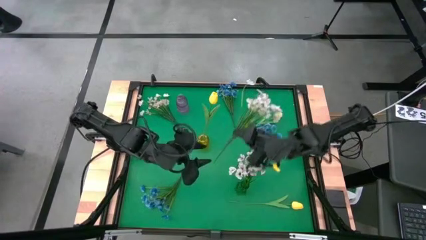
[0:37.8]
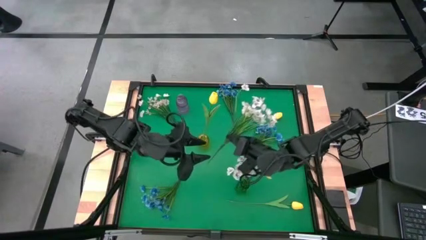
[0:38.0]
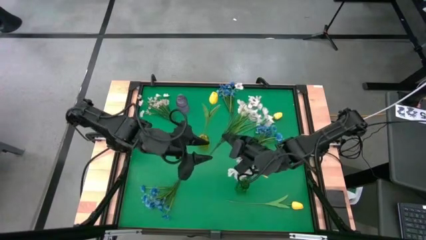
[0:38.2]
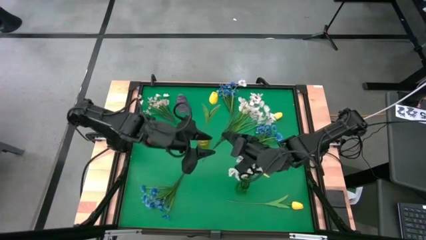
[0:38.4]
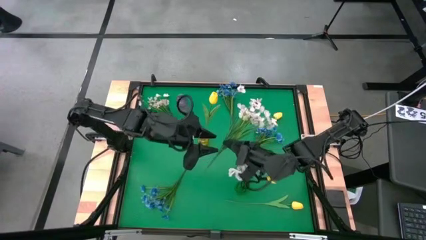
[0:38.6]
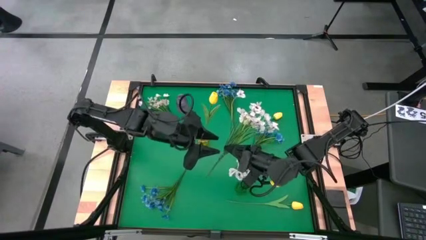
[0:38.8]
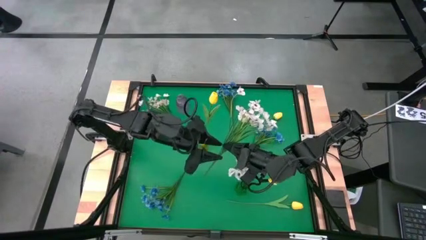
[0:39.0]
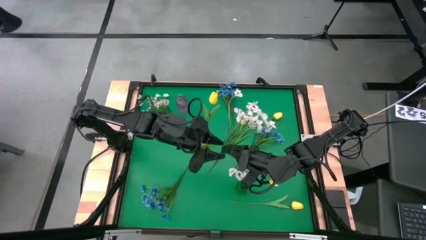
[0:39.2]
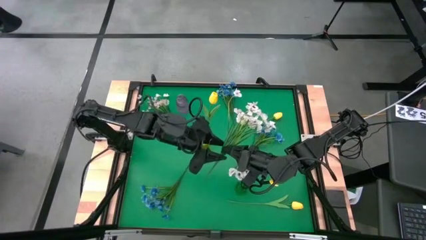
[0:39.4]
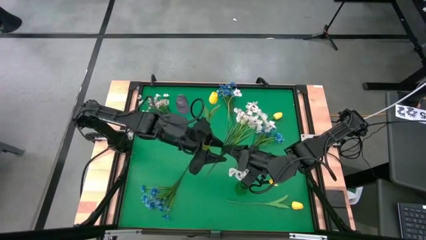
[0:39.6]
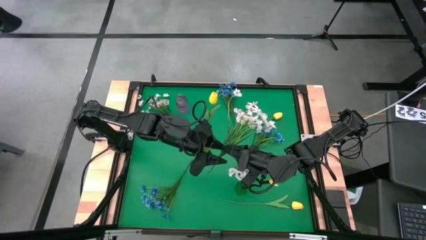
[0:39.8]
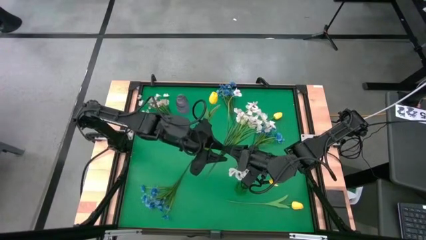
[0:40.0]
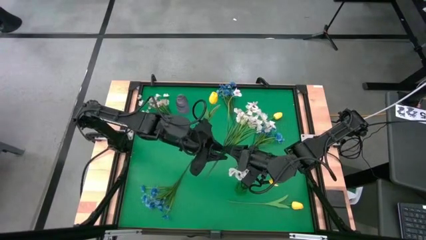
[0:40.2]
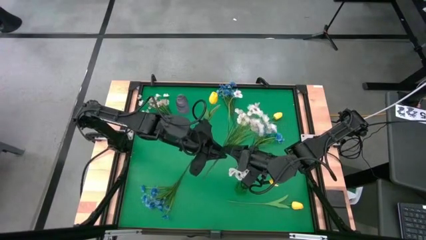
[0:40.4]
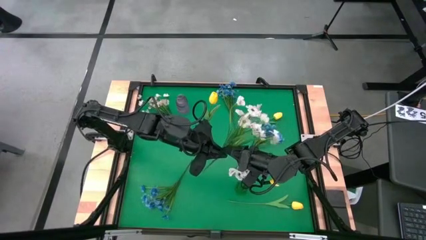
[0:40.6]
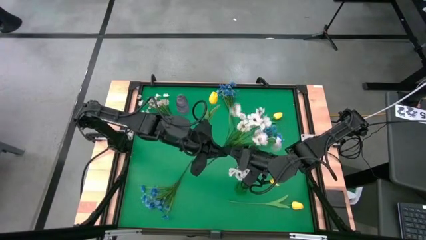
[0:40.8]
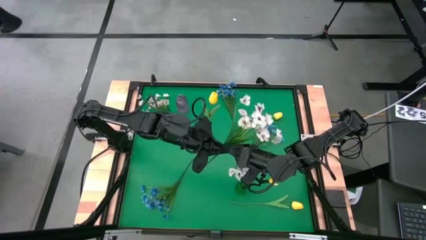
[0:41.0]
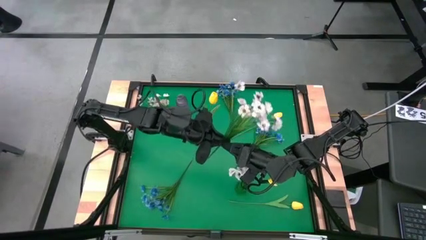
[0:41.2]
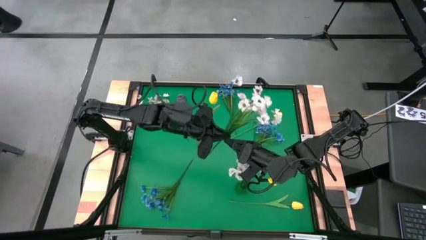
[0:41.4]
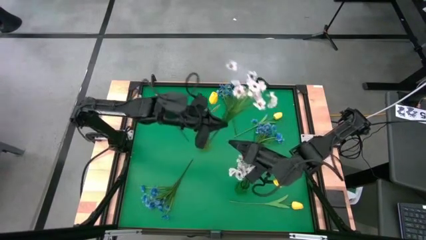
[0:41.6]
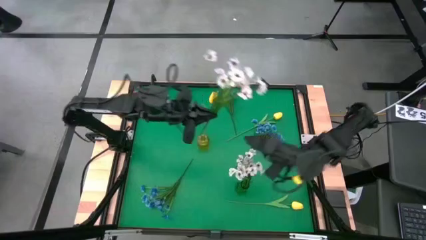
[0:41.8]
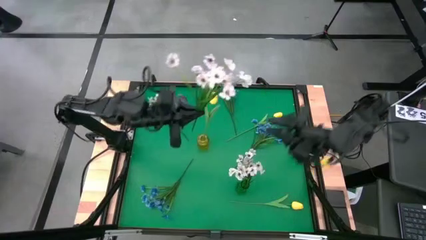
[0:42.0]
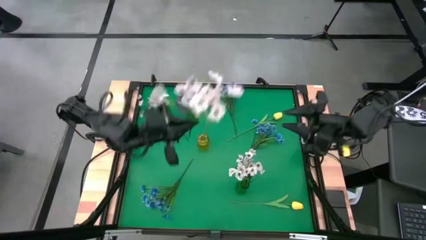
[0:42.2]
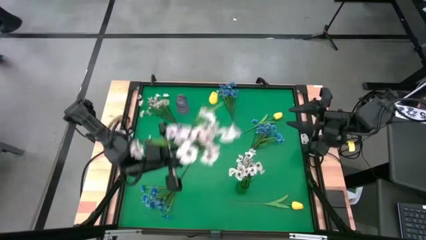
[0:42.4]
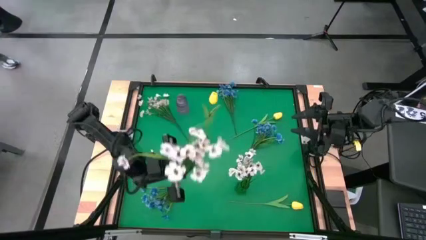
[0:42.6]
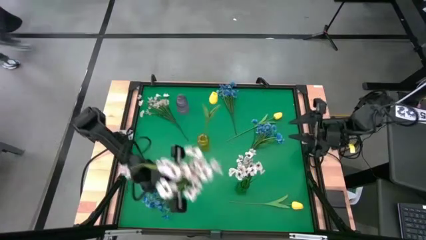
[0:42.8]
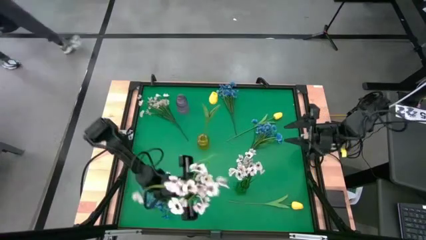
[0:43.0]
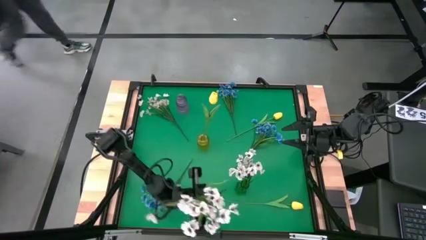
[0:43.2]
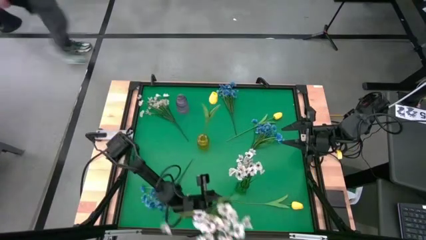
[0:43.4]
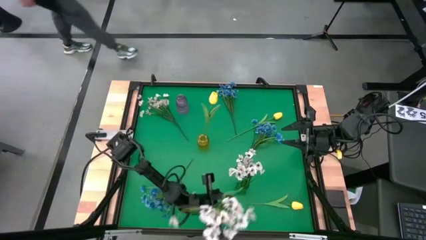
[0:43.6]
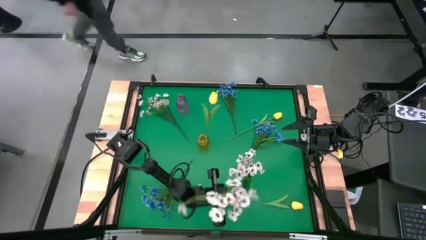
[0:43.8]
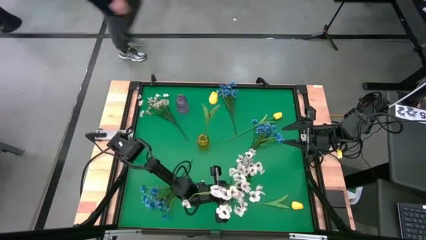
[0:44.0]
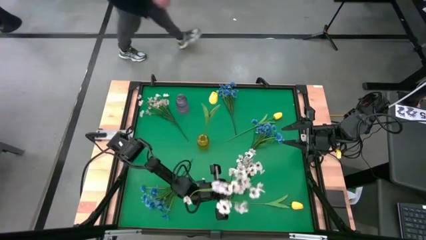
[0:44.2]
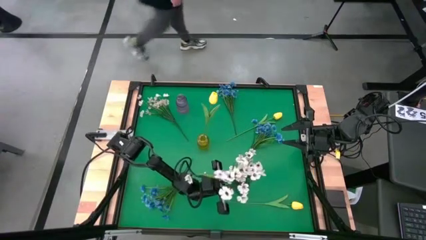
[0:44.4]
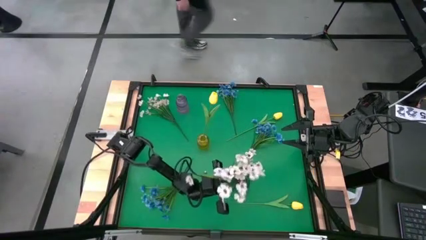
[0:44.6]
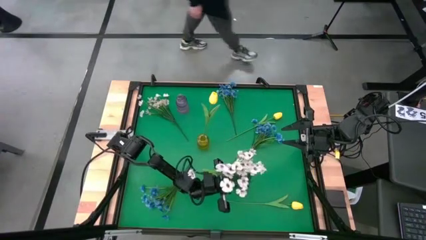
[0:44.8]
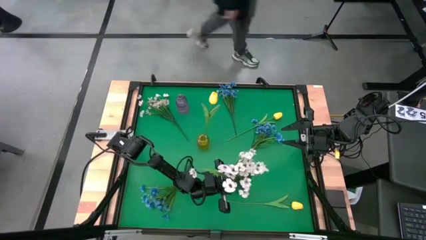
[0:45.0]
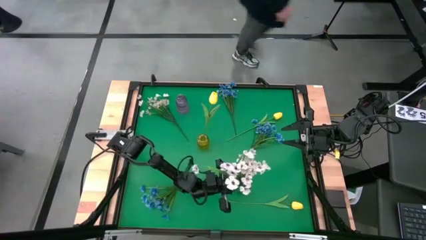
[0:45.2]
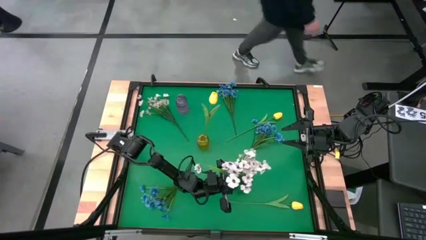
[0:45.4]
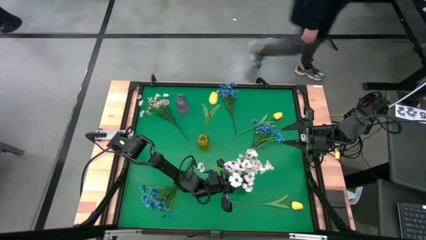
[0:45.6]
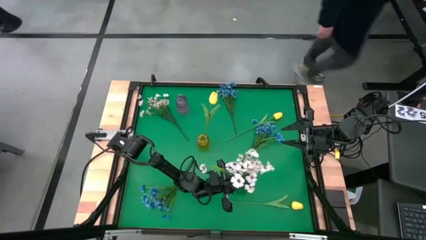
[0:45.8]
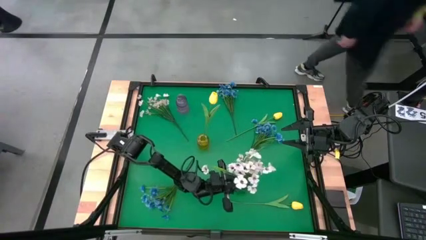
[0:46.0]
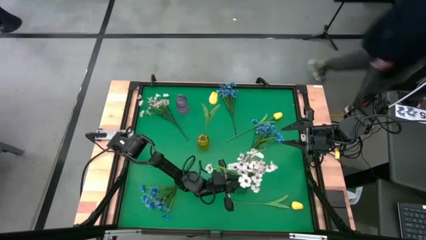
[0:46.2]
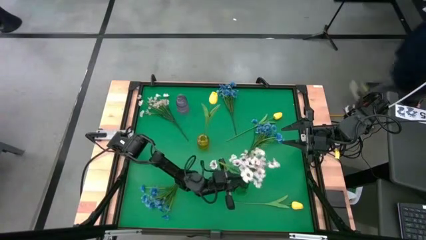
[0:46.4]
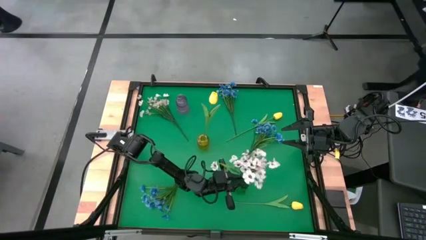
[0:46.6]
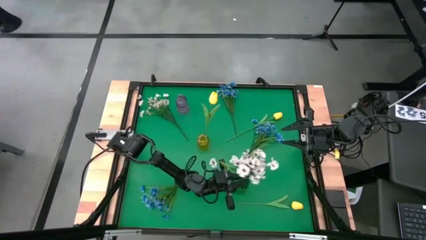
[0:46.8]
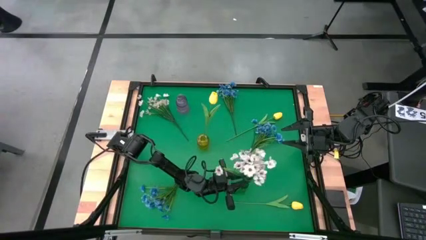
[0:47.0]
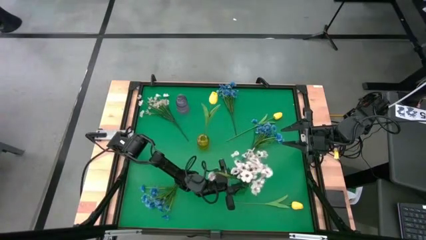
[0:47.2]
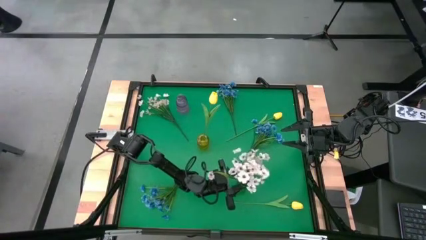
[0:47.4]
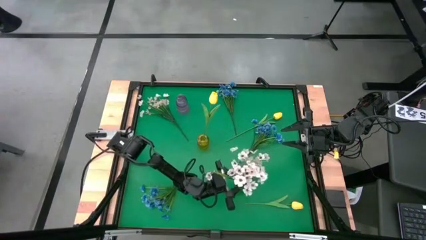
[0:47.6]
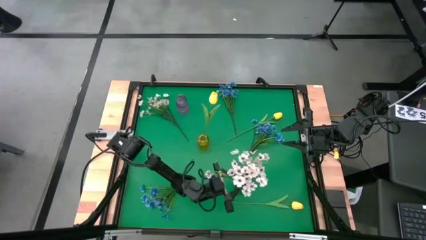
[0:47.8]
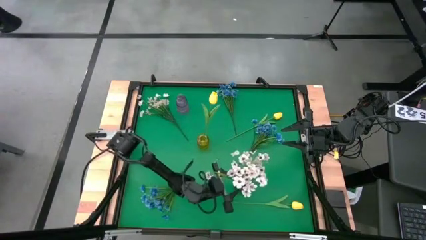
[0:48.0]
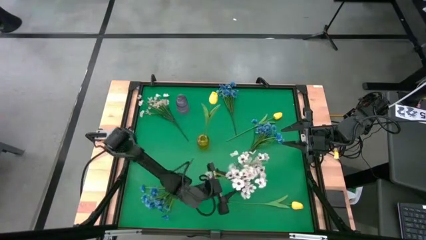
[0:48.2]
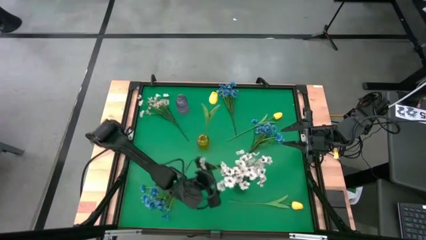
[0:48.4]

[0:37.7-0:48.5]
Task: Sort flowers into vase by color
Put the right white flowers into the green vase

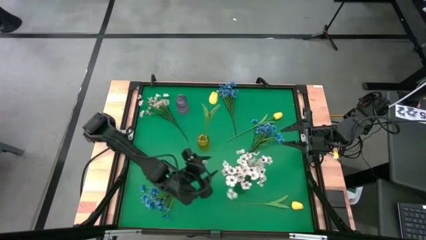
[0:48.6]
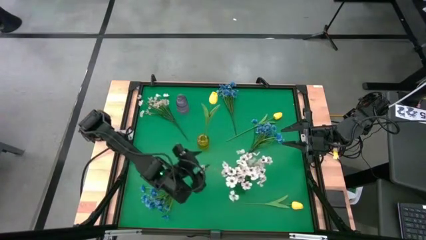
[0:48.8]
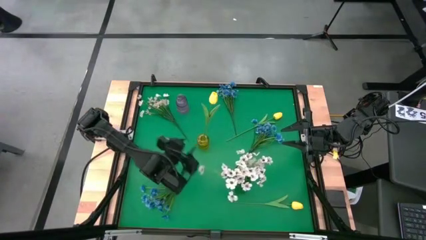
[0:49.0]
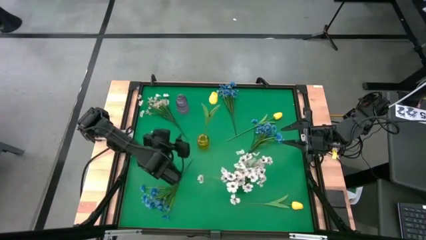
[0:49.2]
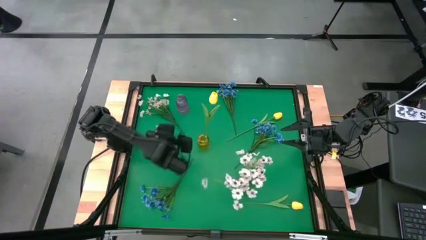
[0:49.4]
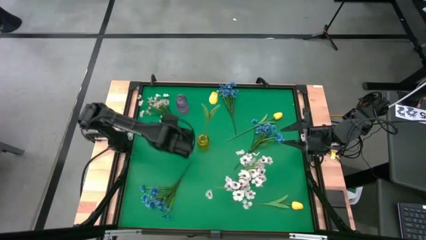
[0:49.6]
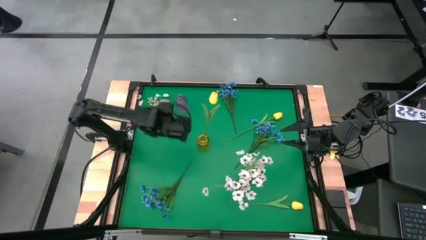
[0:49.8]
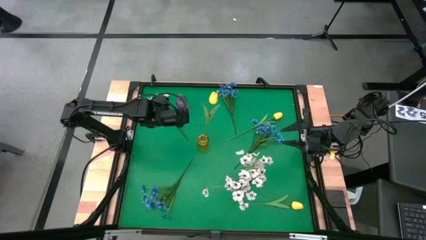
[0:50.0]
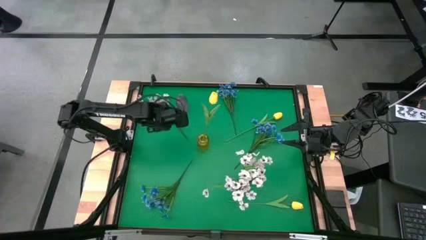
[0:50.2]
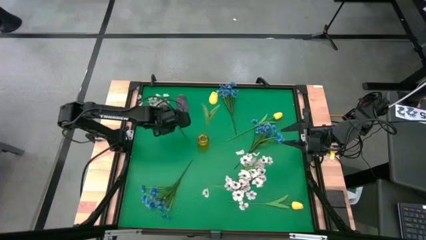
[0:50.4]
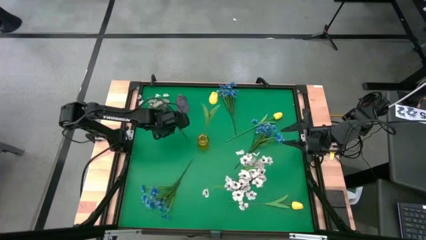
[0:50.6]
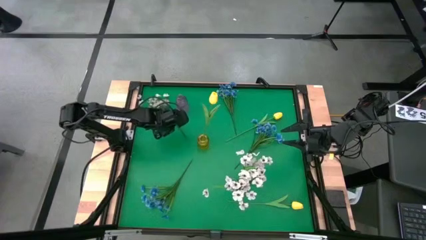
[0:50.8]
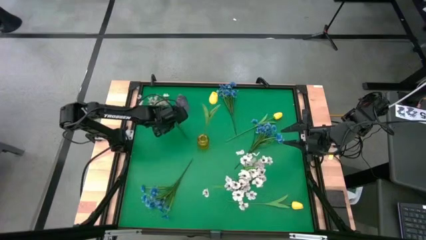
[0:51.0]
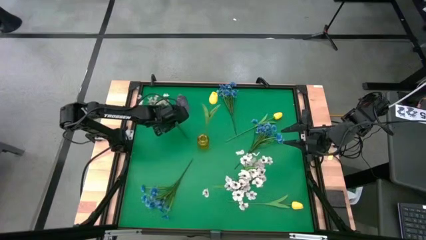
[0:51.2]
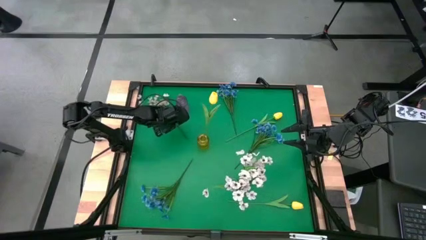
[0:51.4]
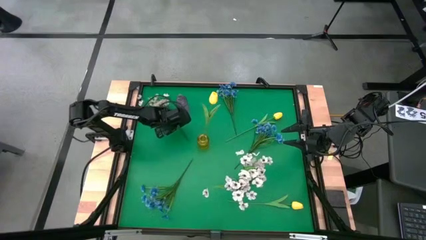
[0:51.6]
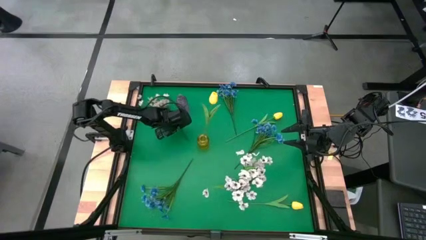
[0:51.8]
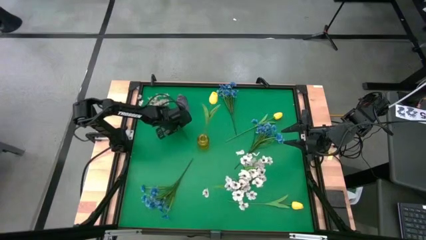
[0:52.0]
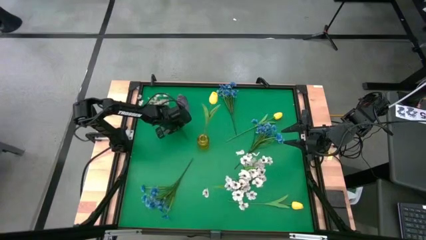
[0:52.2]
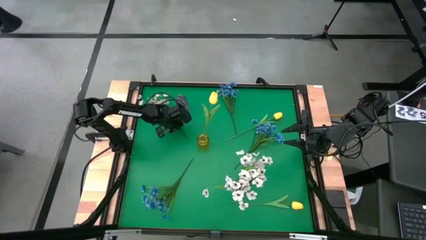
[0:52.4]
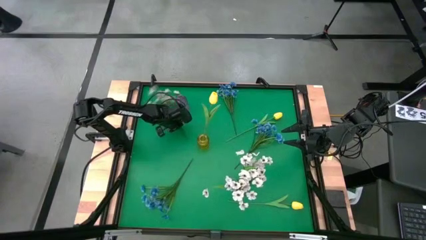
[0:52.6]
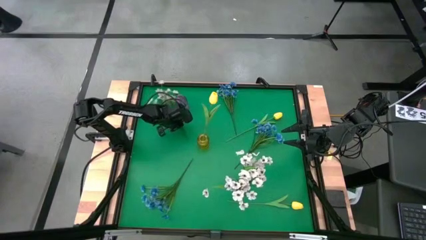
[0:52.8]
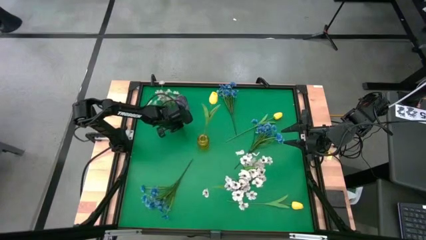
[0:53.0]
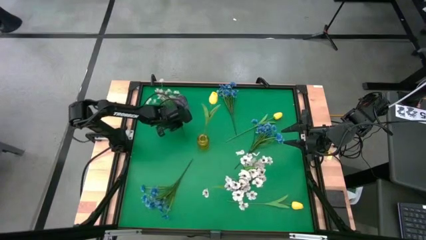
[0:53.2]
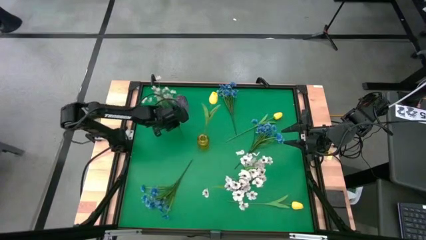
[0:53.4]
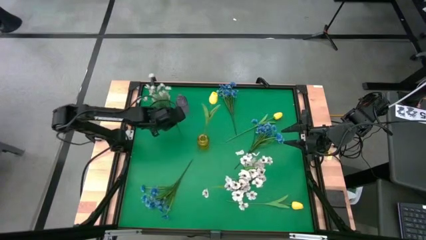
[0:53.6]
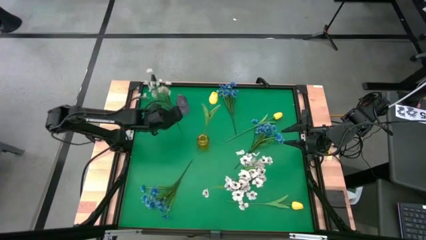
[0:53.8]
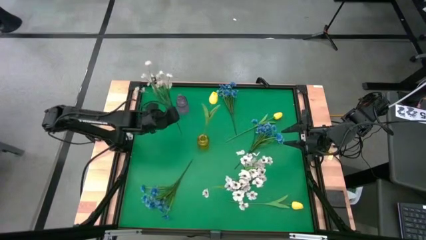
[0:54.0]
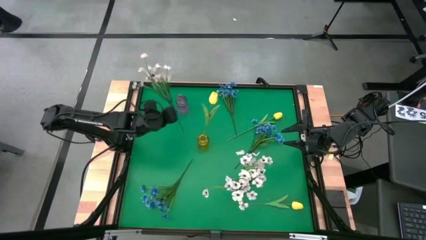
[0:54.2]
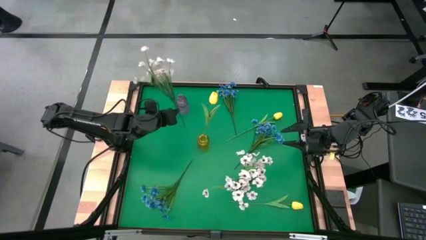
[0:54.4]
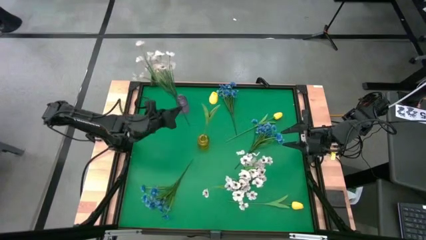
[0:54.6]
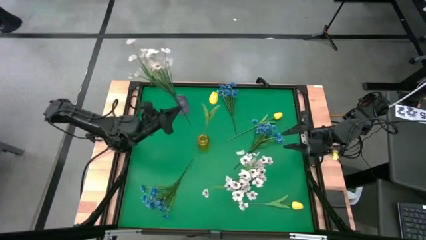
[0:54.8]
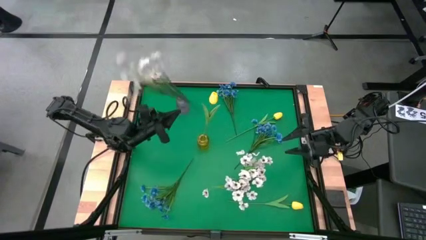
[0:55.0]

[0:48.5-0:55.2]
Put the white flowers into the green vase

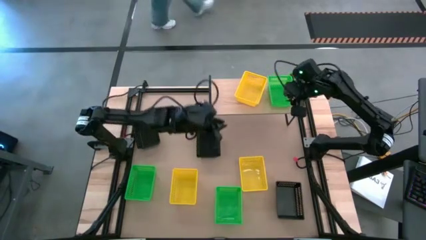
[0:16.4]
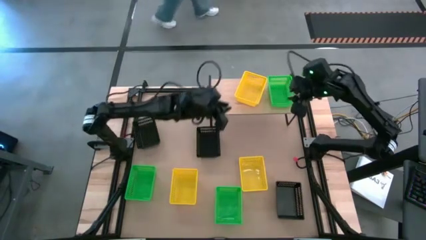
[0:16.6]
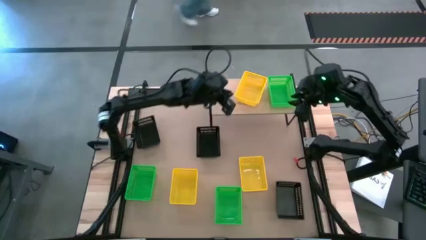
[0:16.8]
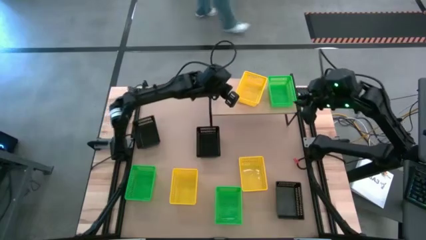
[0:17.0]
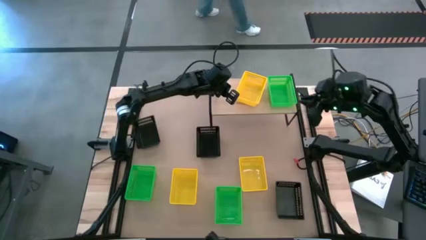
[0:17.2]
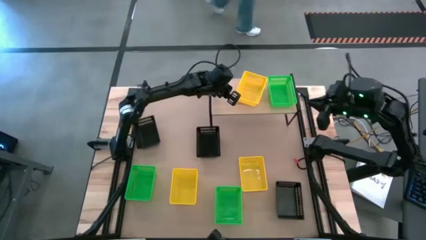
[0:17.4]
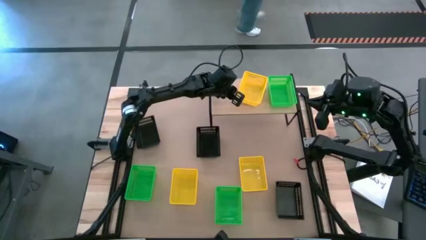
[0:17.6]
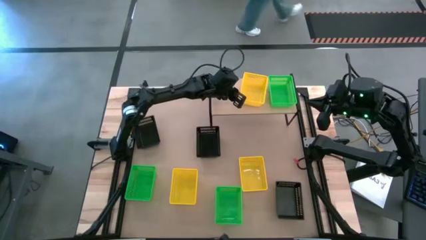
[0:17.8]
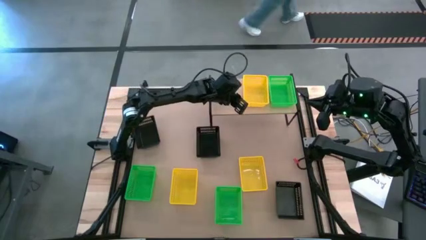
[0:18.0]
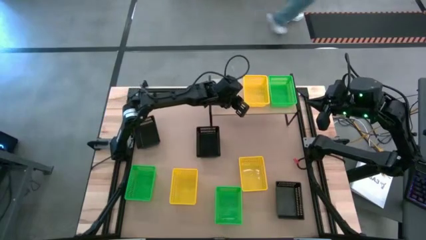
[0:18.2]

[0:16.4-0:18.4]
Task: Stack baskets on shelf by color
Adjust the yellow bin on the shelf
